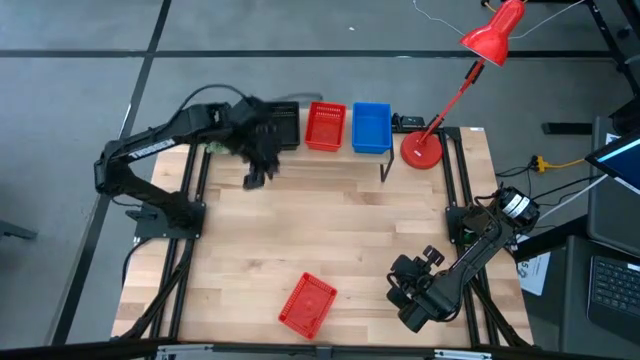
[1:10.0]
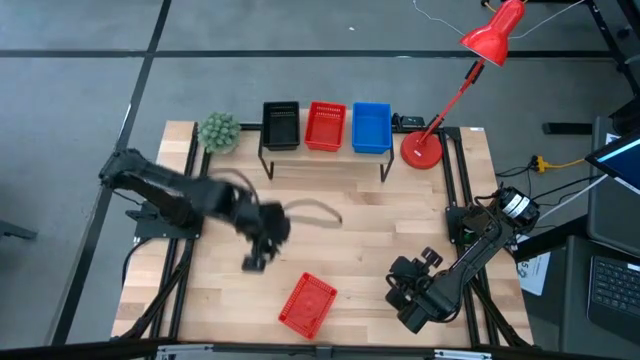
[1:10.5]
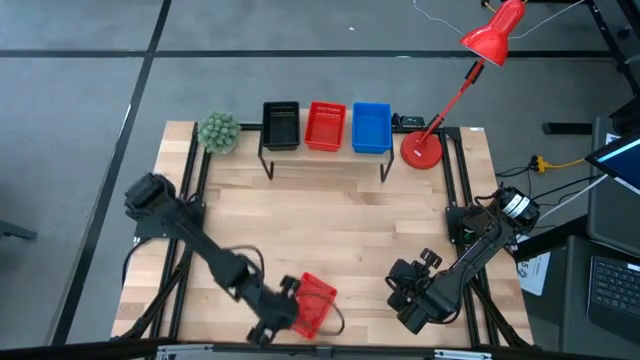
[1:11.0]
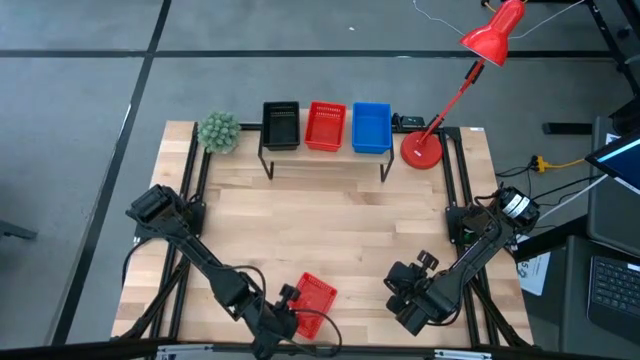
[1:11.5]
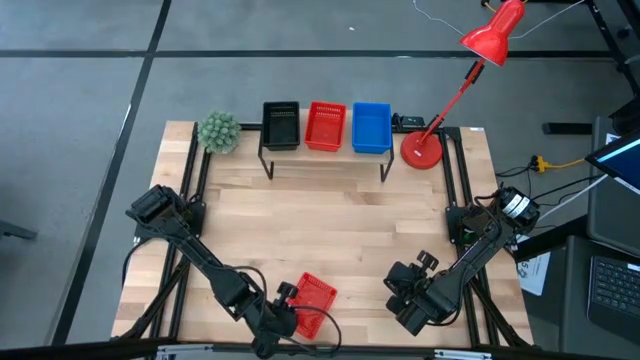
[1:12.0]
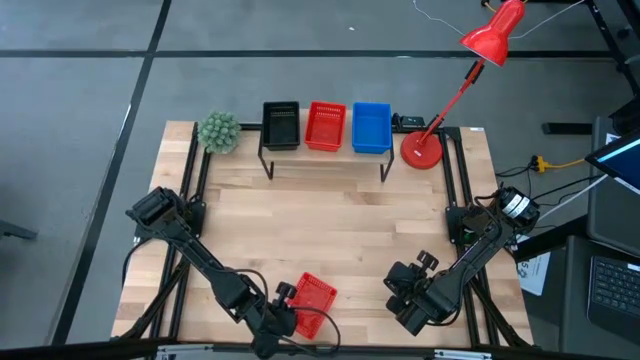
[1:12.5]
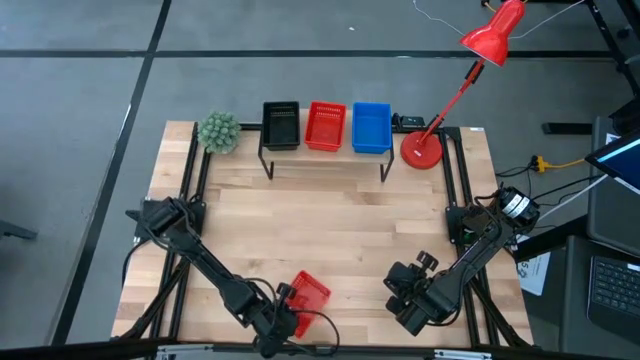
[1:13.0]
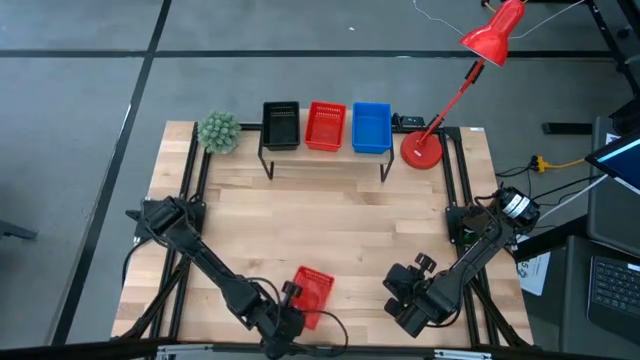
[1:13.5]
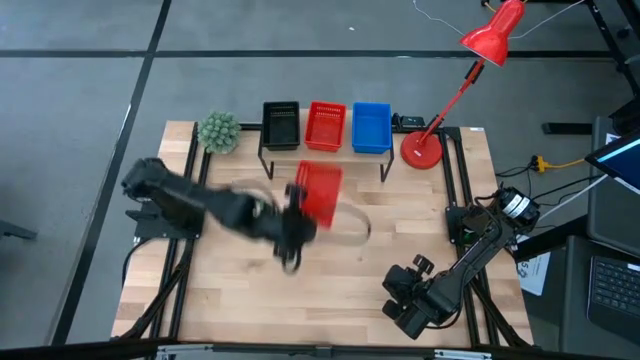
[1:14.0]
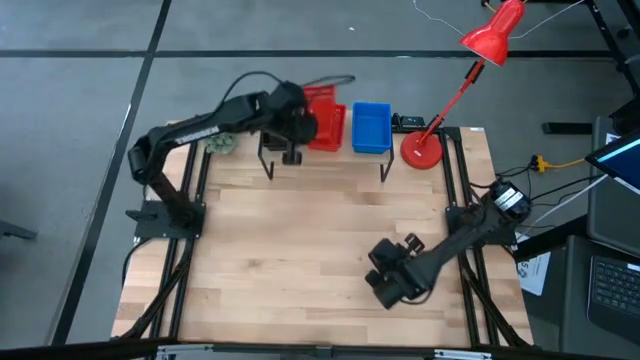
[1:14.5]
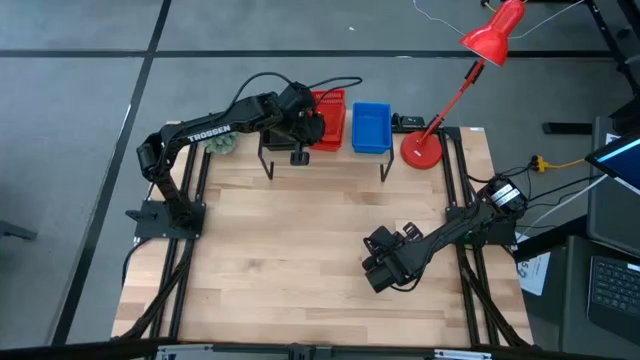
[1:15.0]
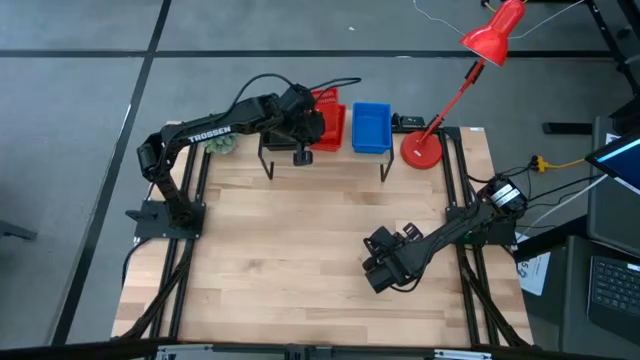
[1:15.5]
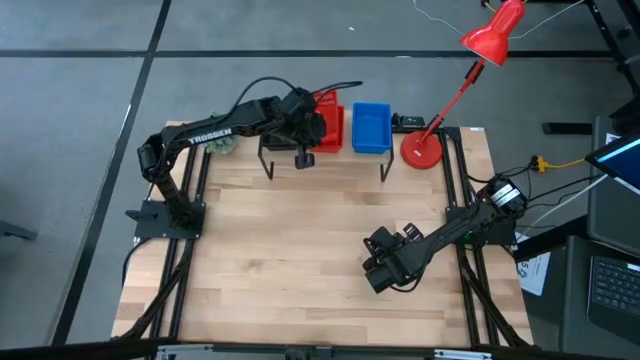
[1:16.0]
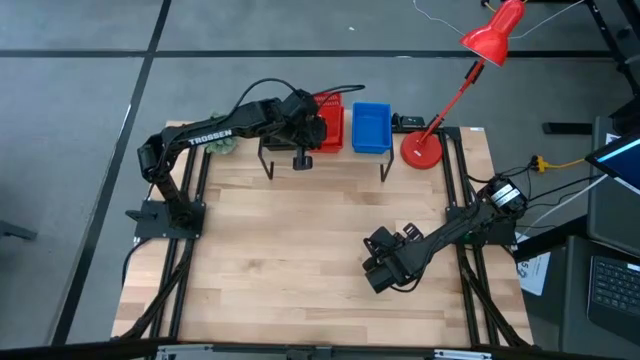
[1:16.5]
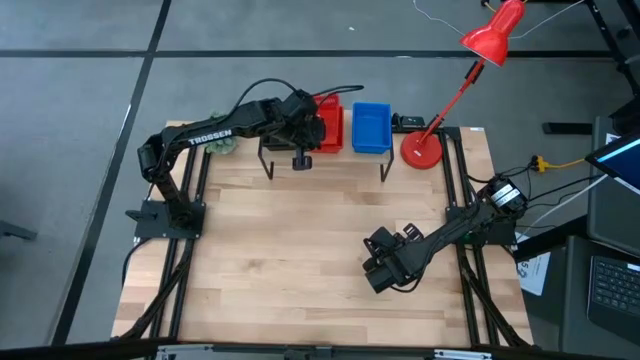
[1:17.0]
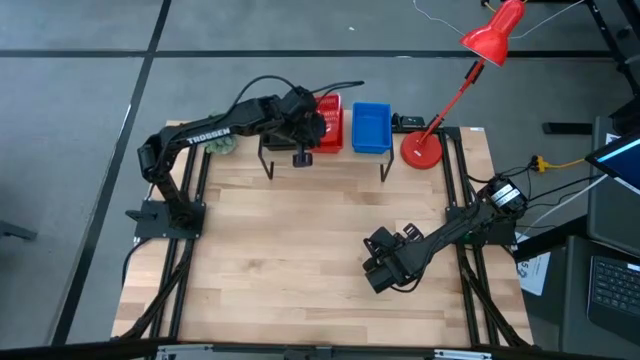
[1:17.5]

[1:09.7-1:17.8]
Task: Stack baskets on shelf by color
Stack the red bin on the stacked red bins on the shelf

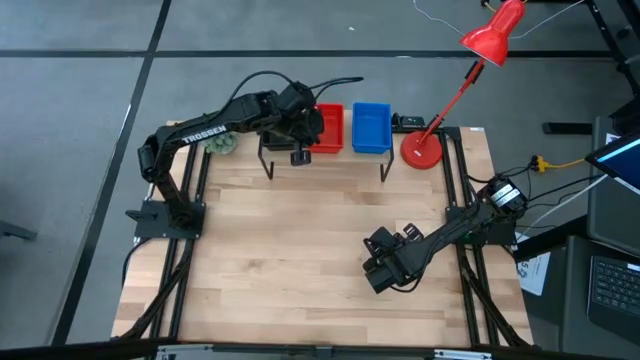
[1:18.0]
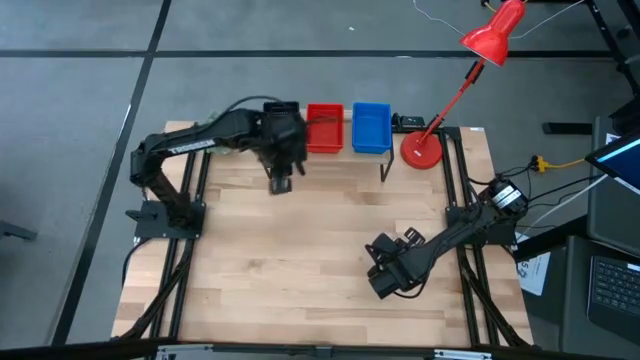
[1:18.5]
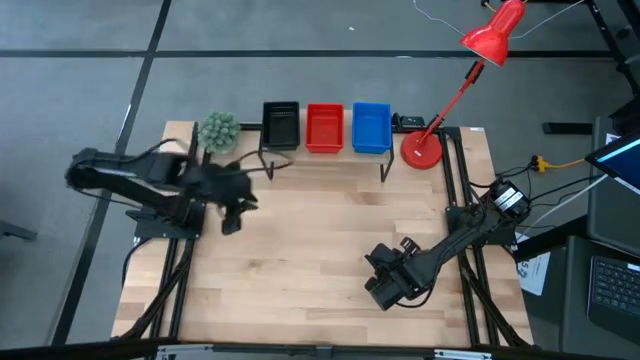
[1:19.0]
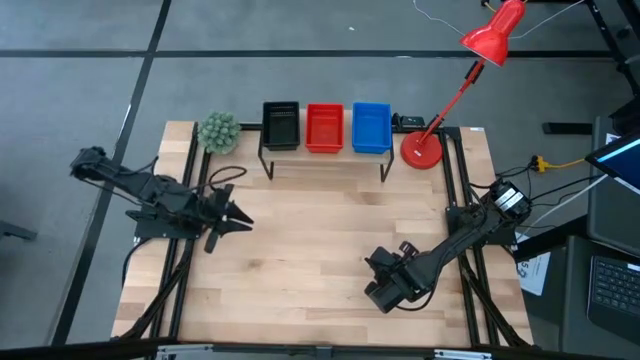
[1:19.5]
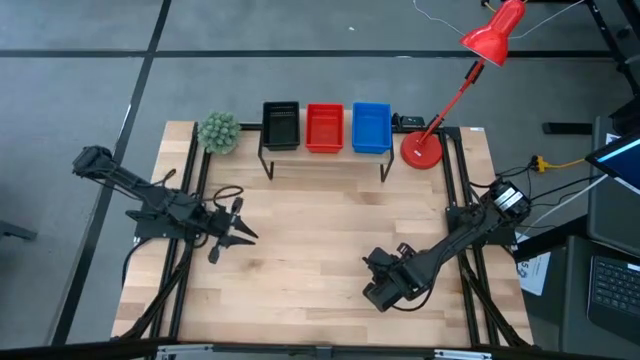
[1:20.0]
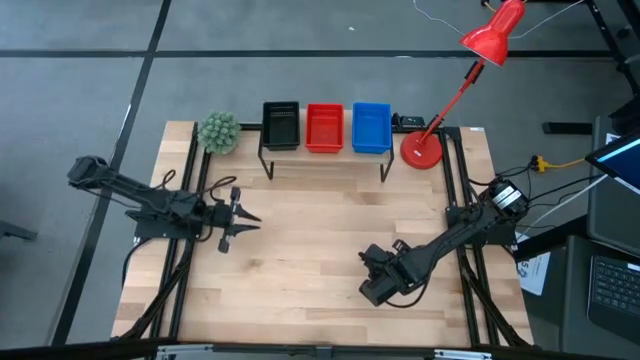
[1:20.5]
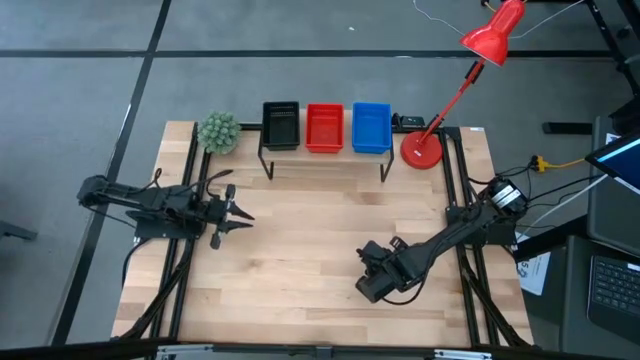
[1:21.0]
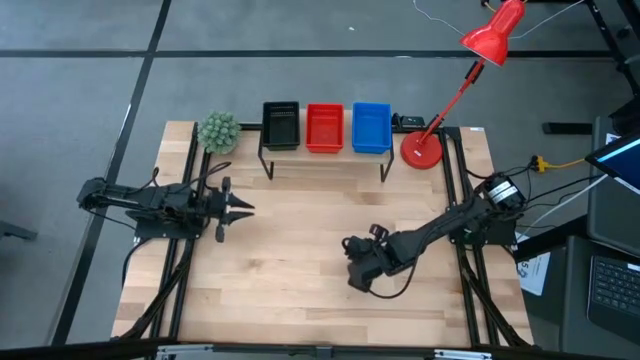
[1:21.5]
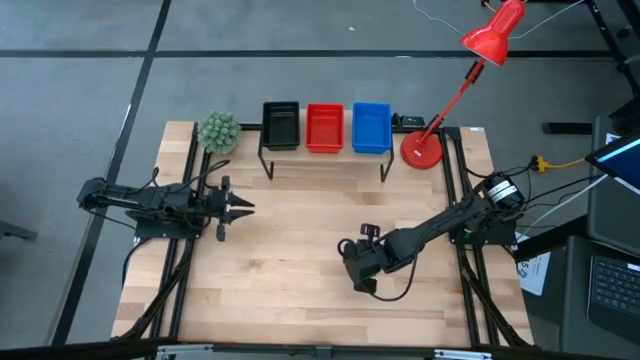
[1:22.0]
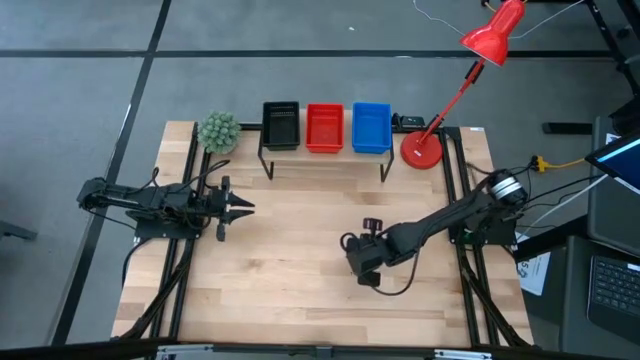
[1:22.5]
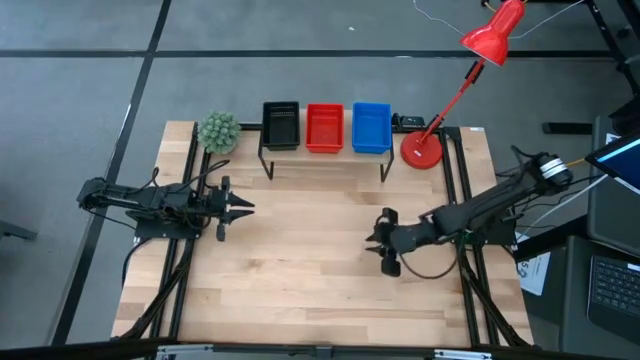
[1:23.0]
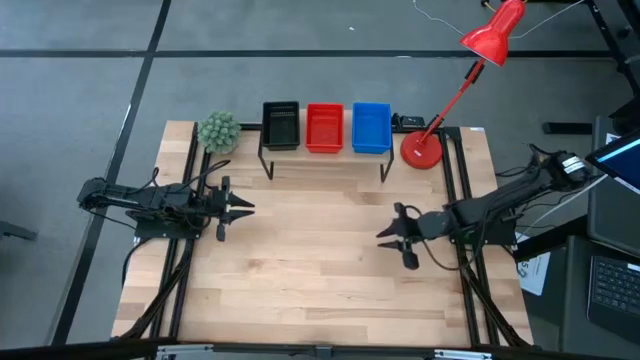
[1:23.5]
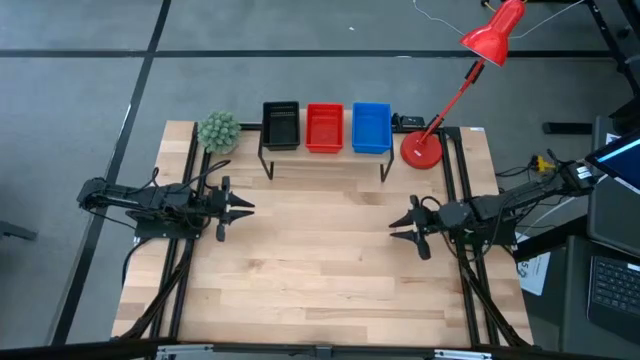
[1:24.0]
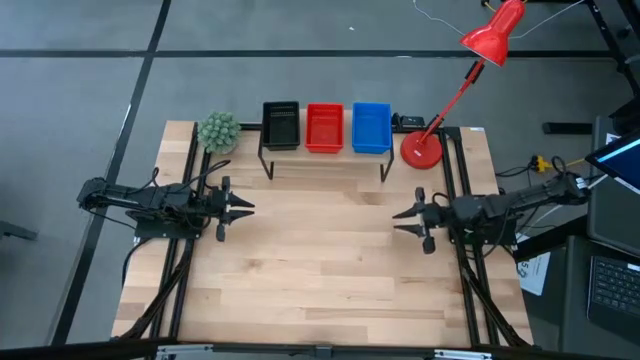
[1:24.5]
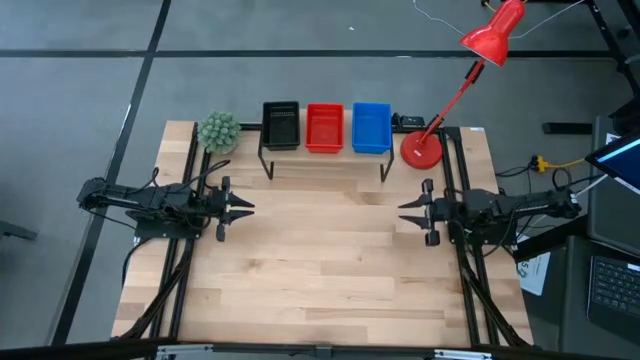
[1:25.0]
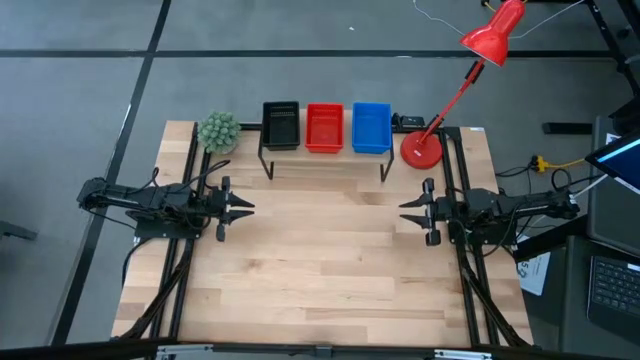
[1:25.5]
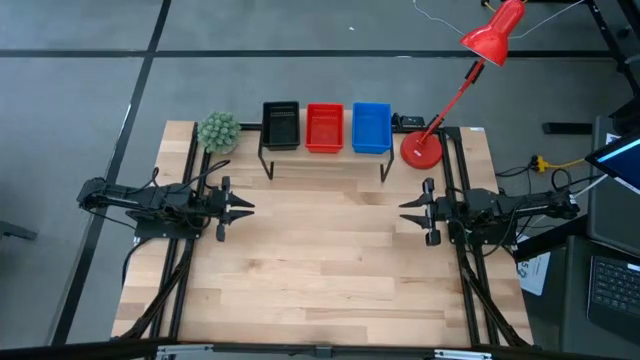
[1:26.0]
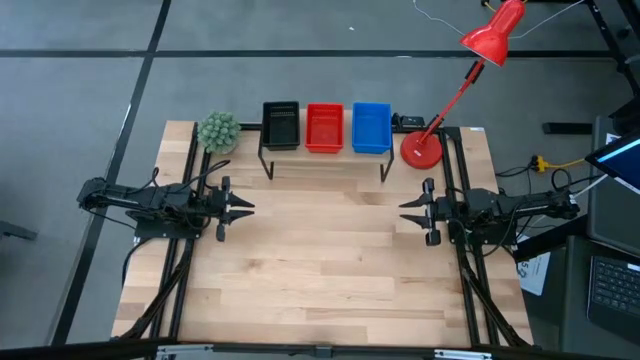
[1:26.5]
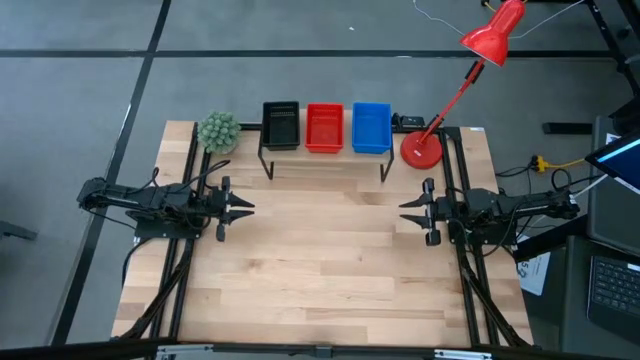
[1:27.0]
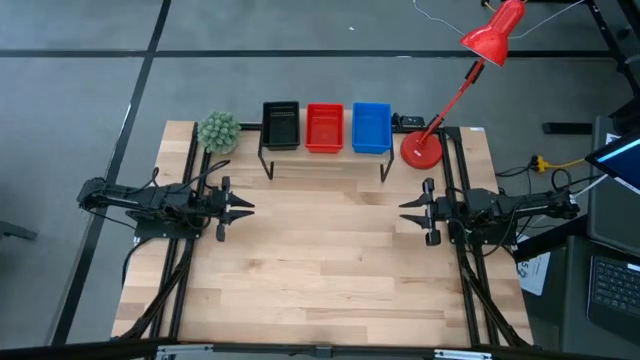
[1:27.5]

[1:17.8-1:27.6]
Return to Home Position

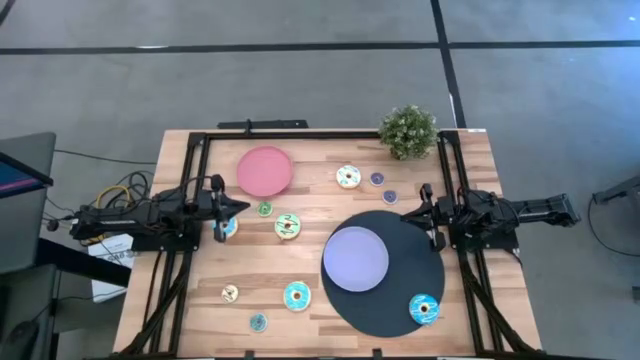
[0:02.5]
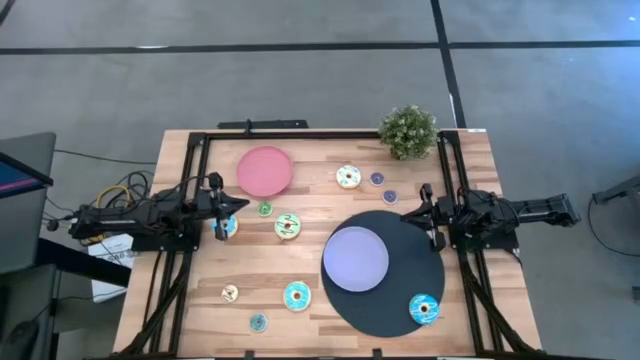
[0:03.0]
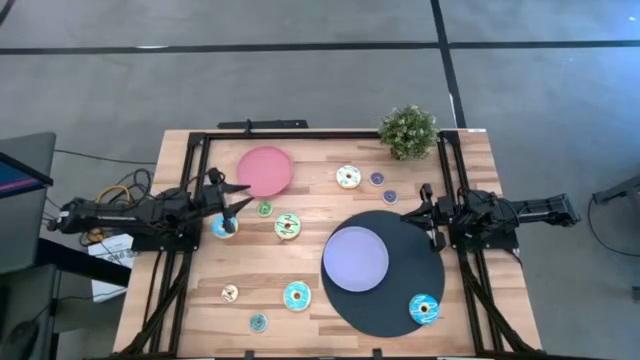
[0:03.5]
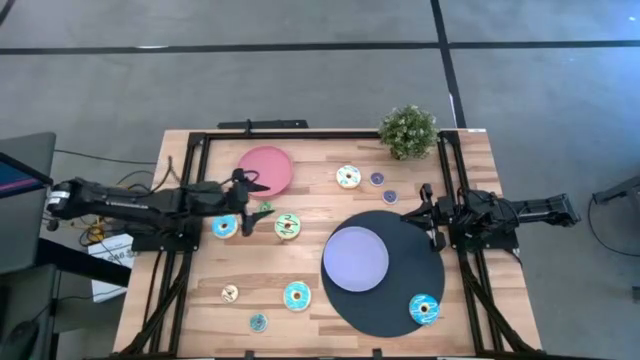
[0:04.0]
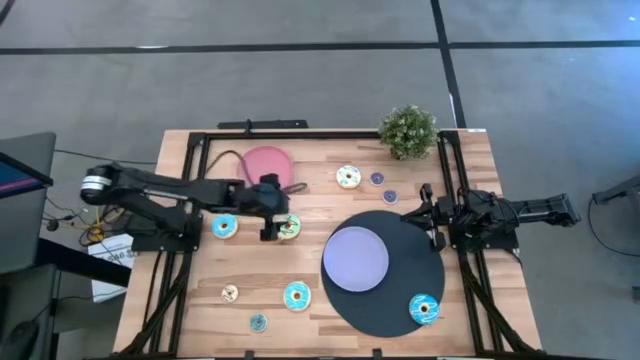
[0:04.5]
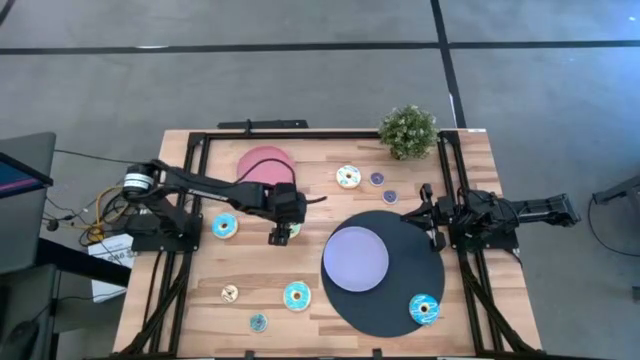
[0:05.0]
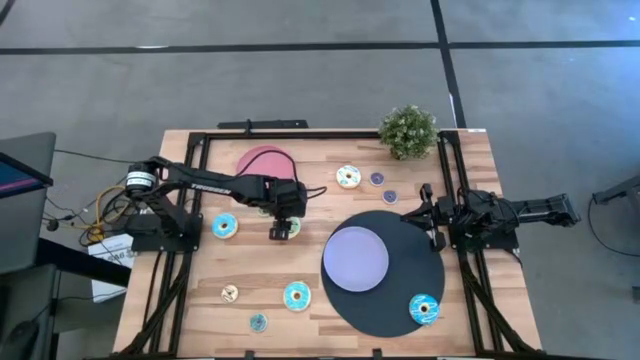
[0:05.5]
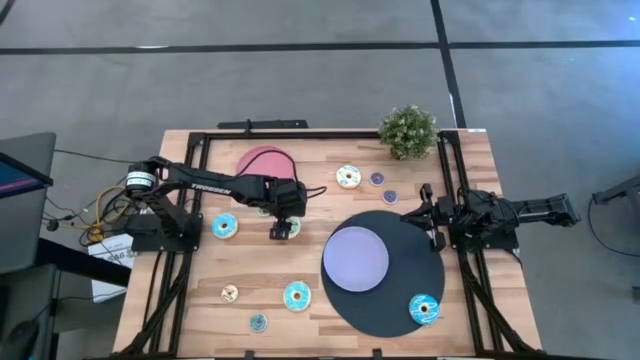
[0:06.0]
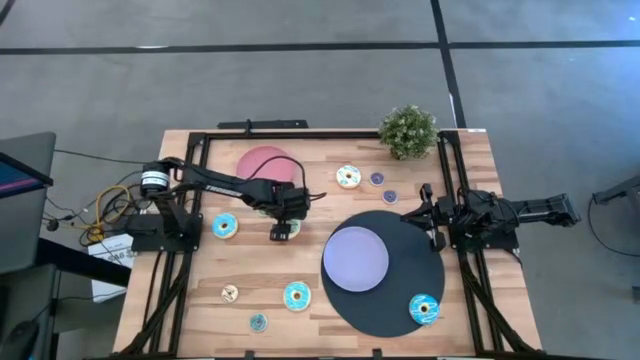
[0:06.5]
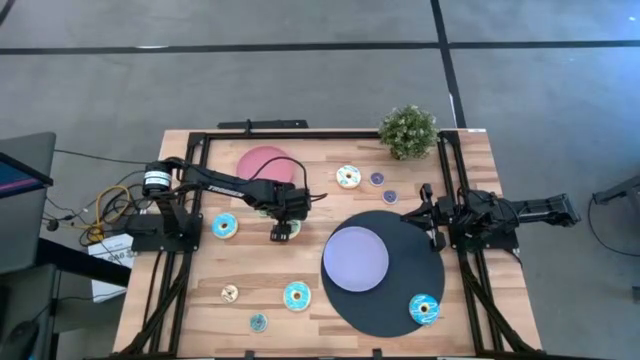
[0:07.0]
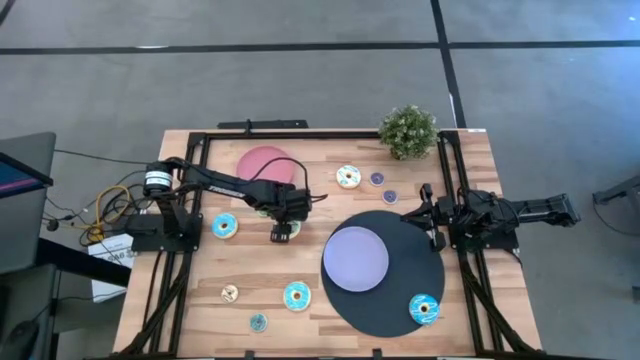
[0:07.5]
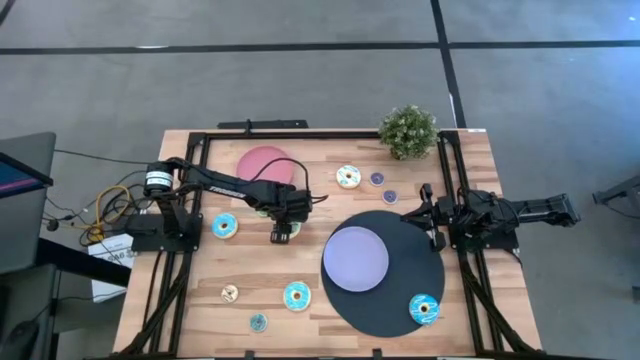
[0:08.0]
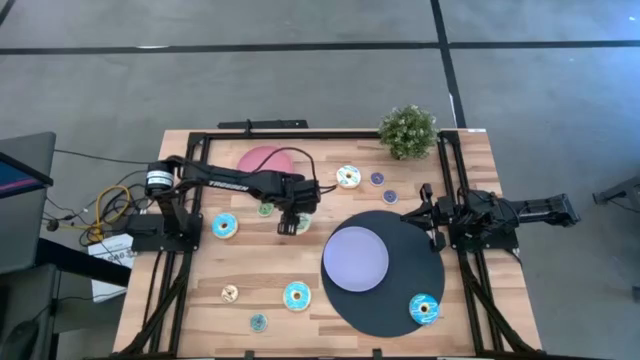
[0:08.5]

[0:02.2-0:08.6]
Task: Pick & Place donuts
Put the big green donut on the pink plate
